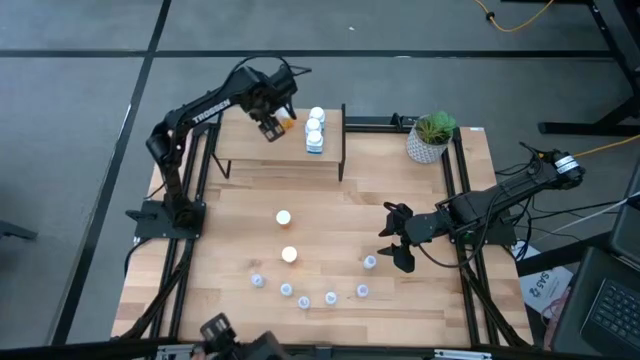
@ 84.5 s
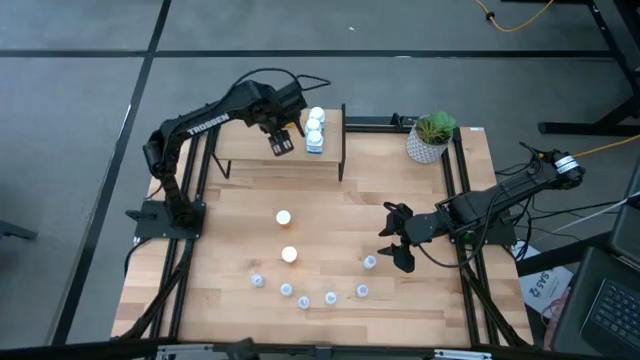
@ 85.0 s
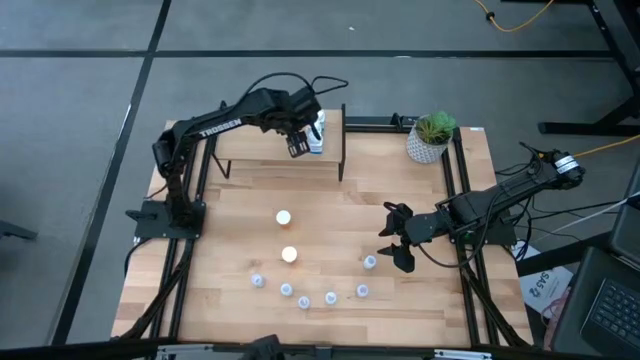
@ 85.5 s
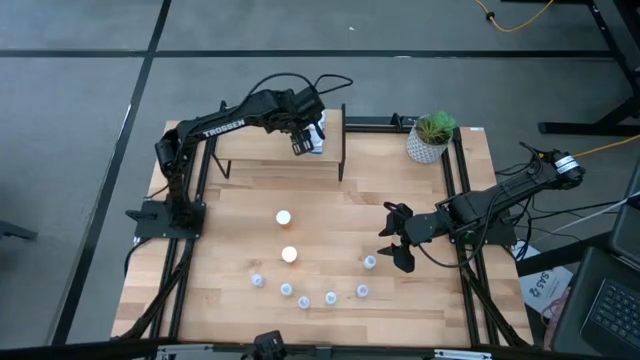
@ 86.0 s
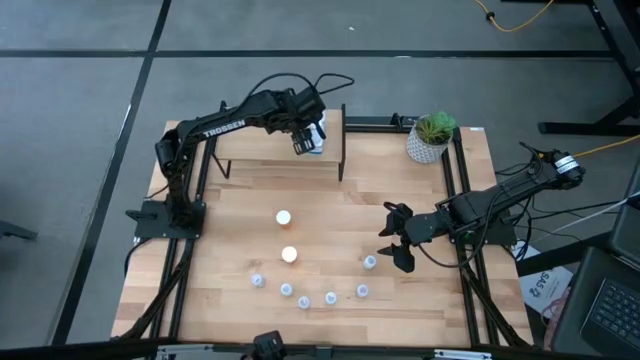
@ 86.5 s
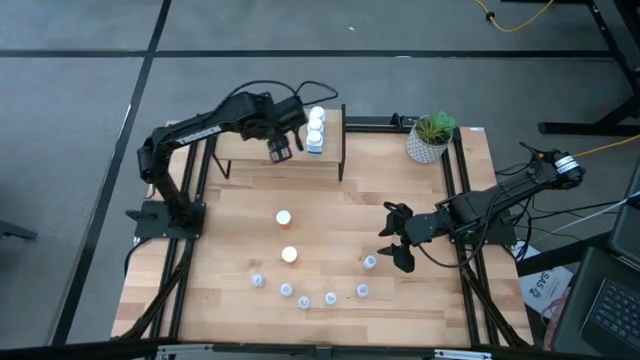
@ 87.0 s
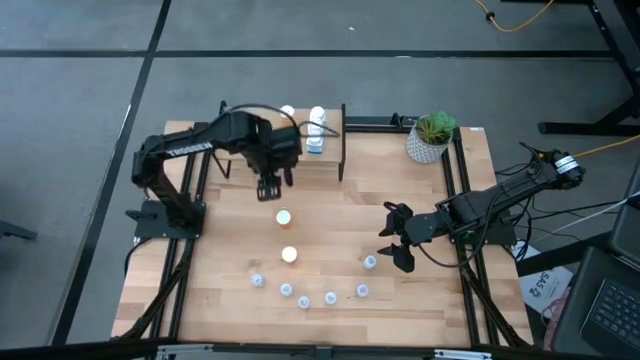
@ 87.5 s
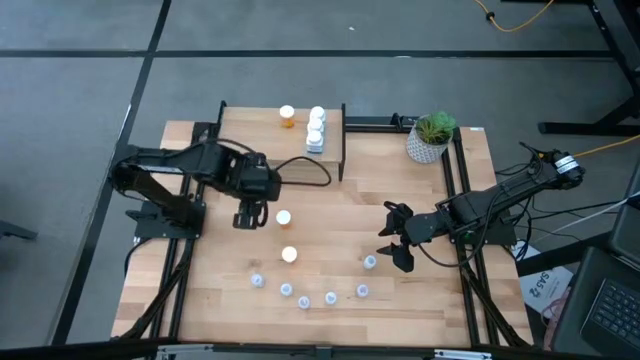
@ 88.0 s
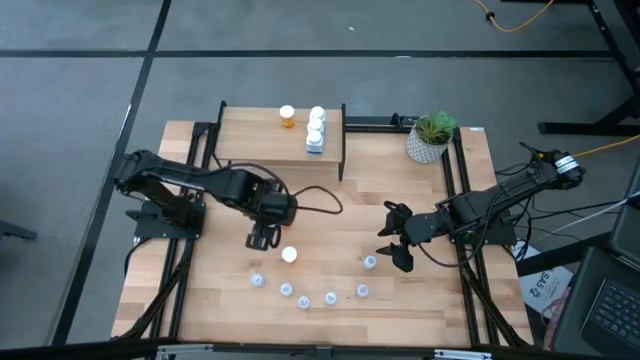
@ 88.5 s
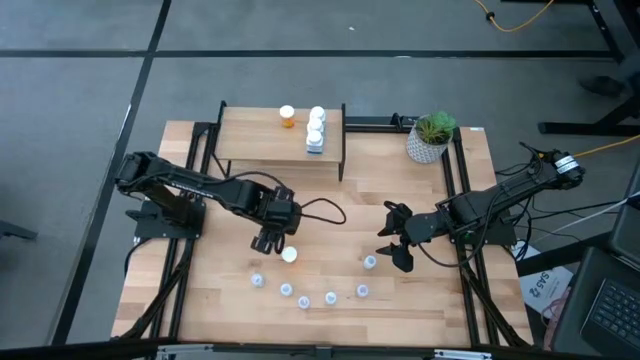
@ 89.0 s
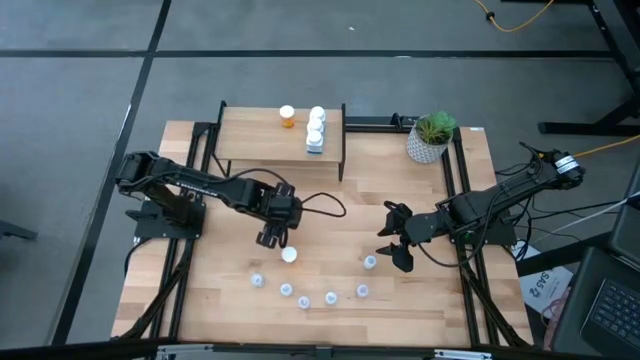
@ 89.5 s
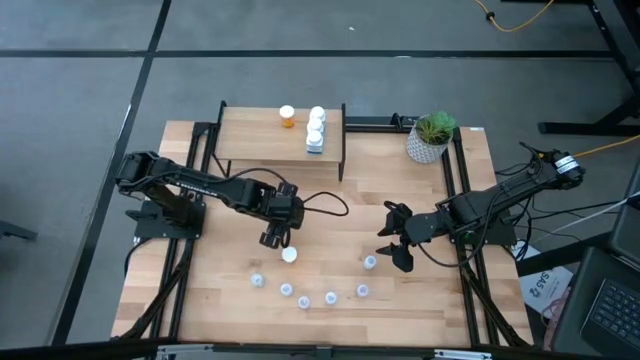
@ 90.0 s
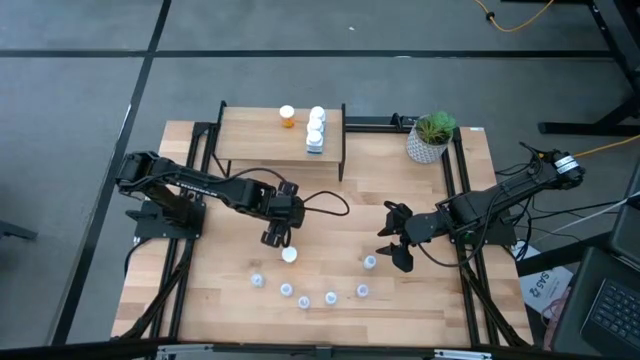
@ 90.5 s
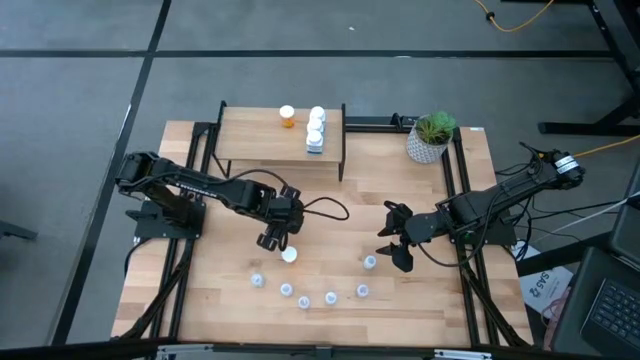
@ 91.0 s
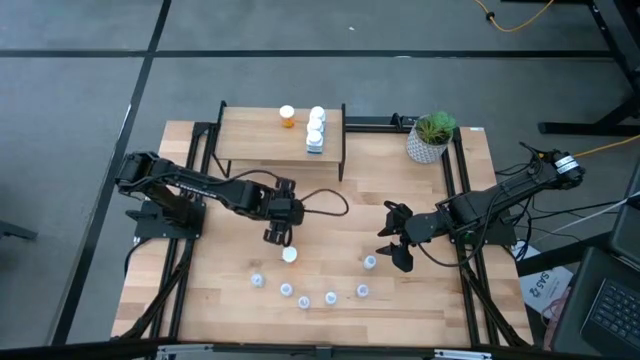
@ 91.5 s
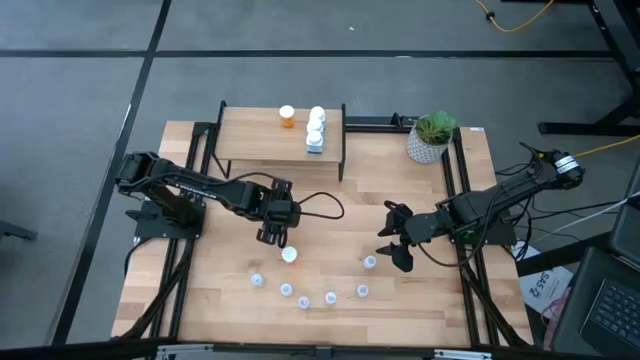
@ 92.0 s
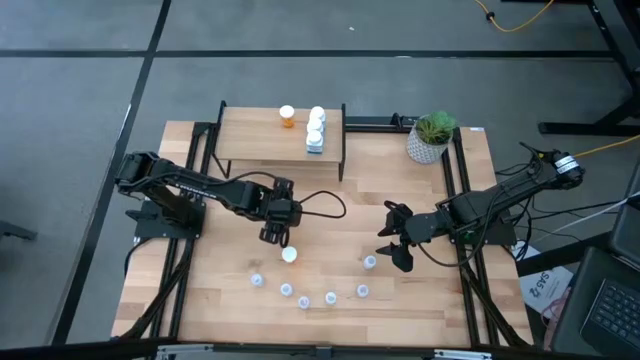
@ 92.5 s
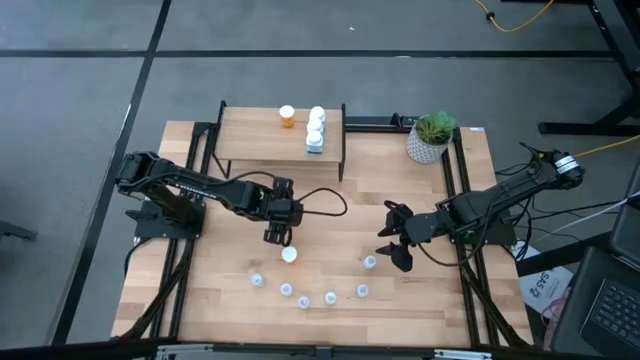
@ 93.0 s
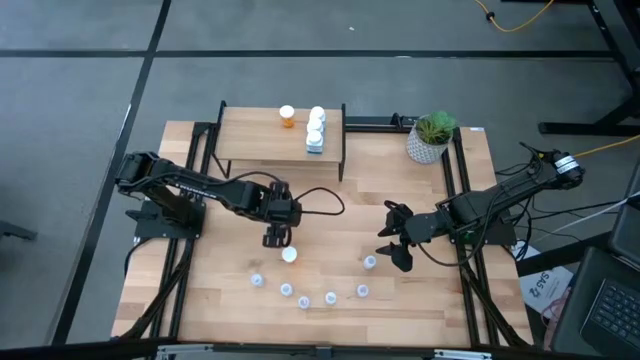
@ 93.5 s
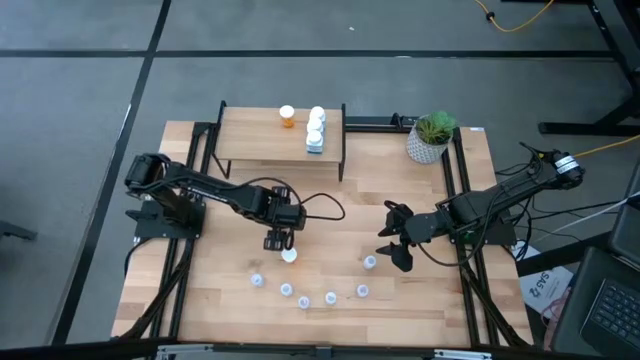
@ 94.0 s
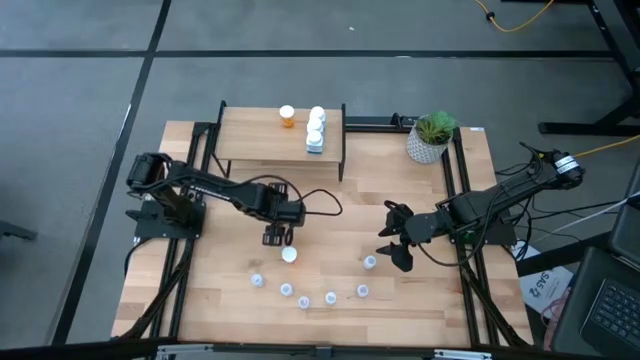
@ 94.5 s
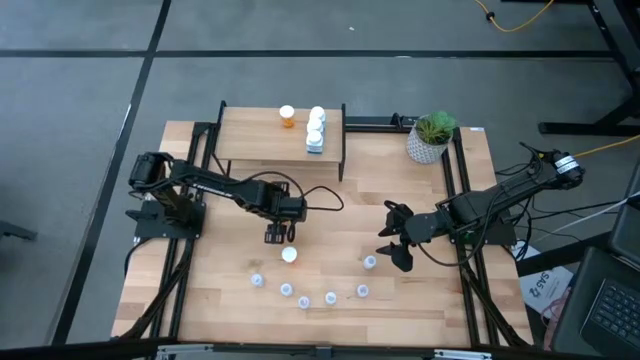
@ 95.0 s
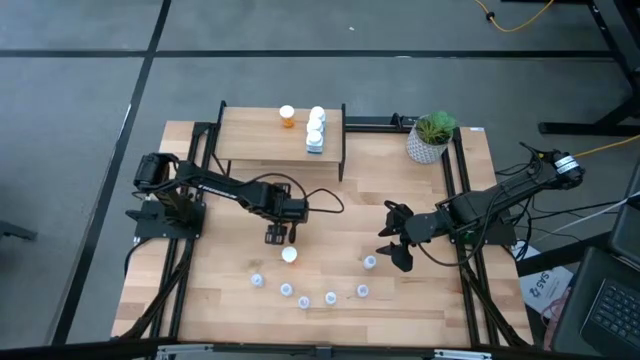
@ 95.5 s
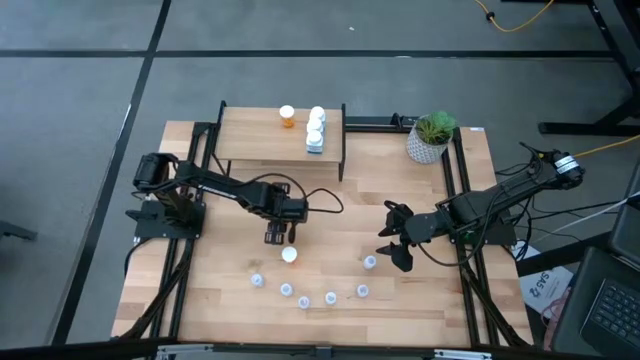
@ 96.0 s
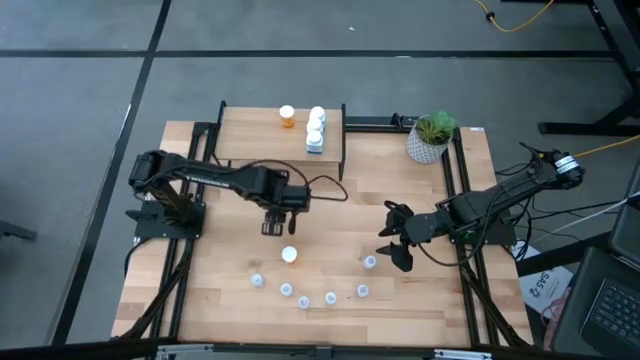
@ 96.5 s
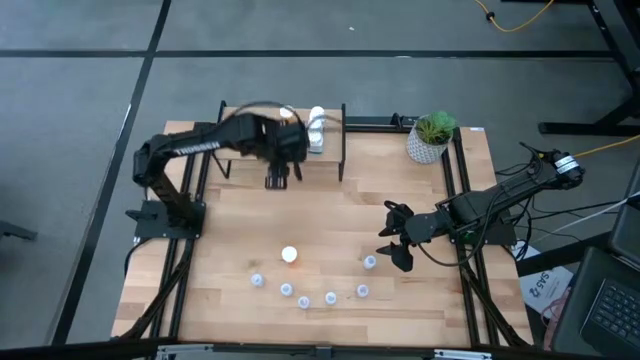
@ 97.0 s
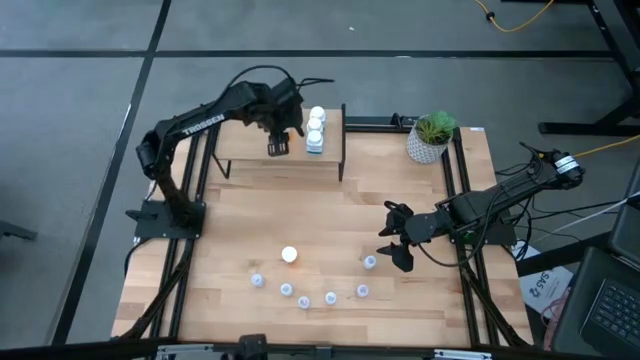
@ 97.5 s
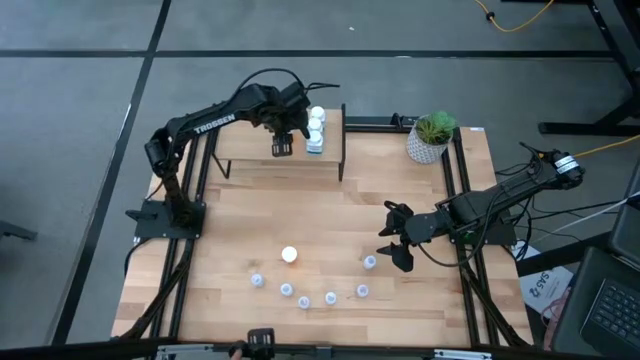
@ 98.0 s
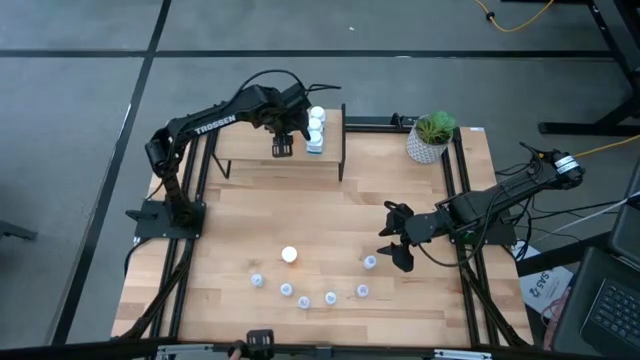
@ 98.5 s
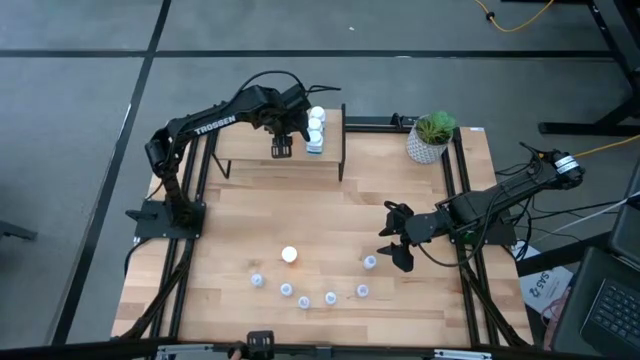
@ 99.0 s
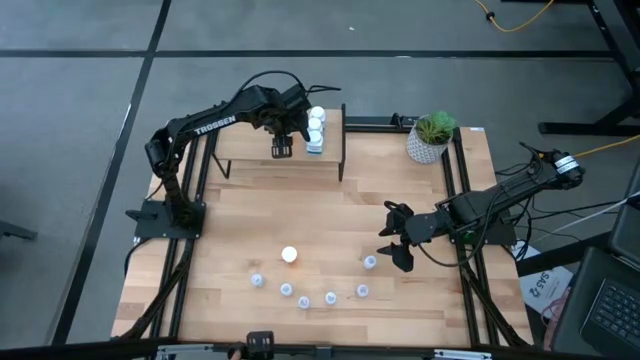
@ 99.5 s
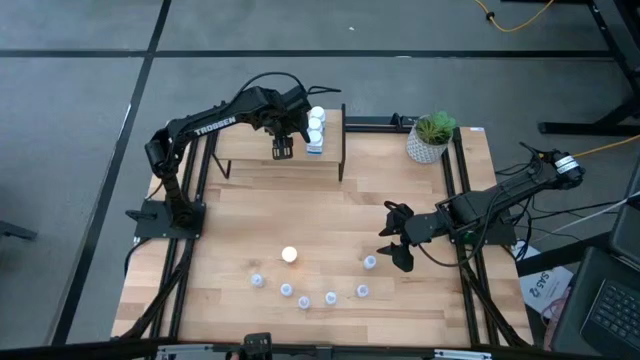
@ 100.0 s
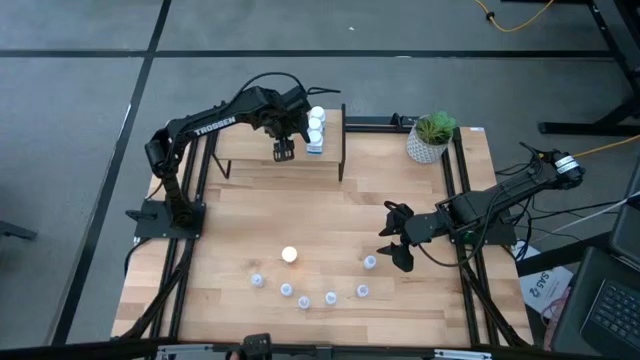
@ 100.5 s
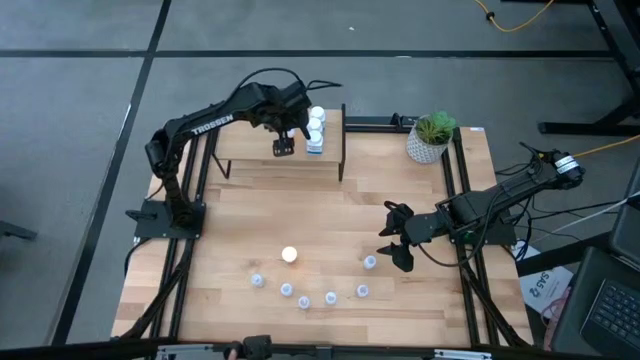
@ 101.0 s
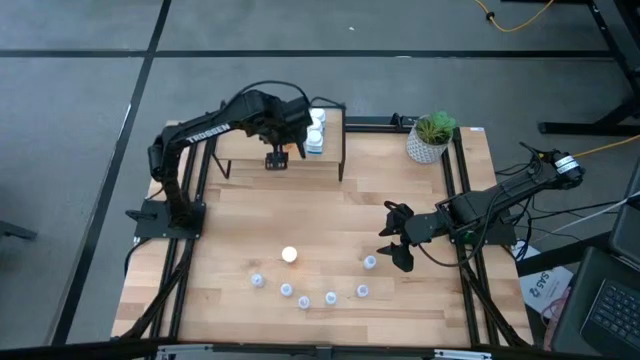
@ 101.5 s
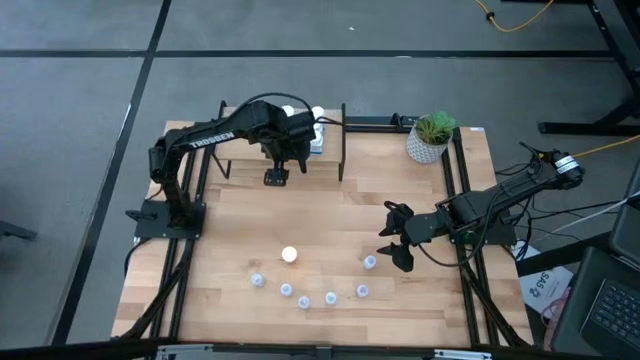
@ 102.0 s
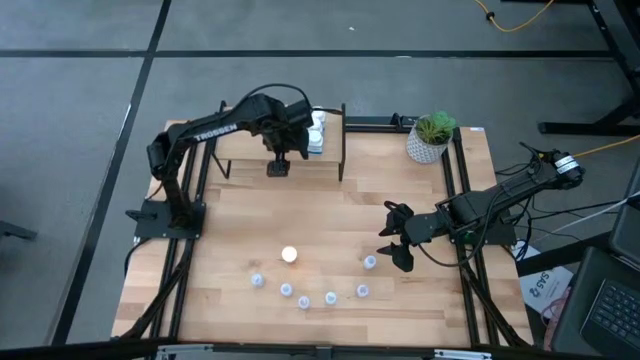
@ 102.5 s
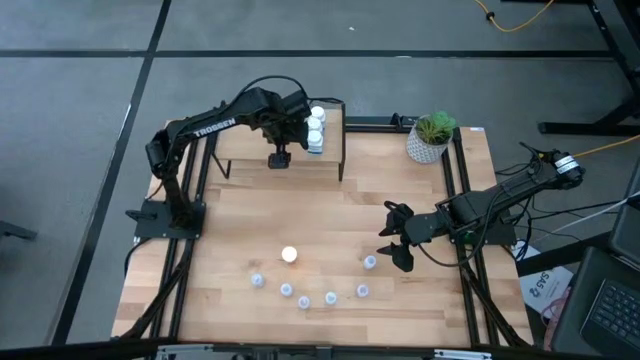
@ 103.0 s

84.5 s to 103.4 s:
Task: Pick and place medicine bottles onto shelf by color
Put the top orange pill bottle on the shelf aligned with the orange pill bottle

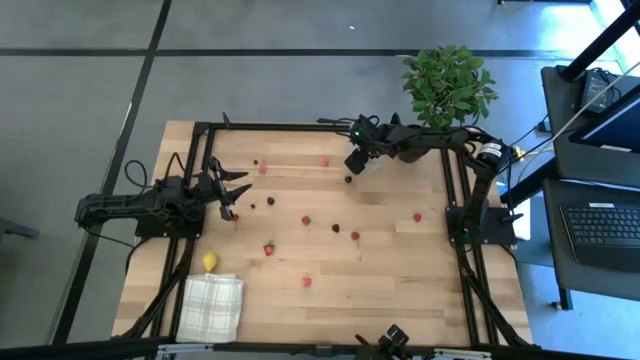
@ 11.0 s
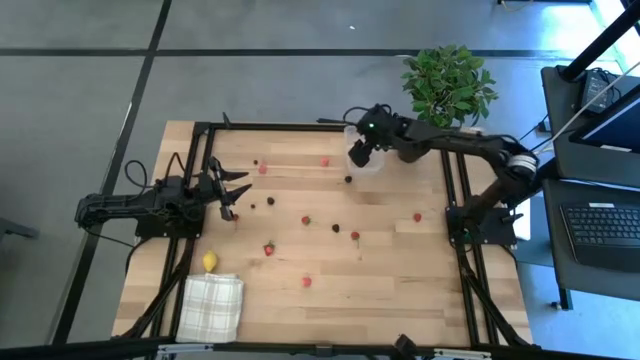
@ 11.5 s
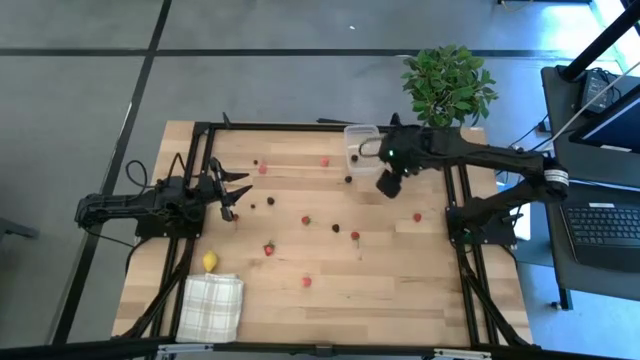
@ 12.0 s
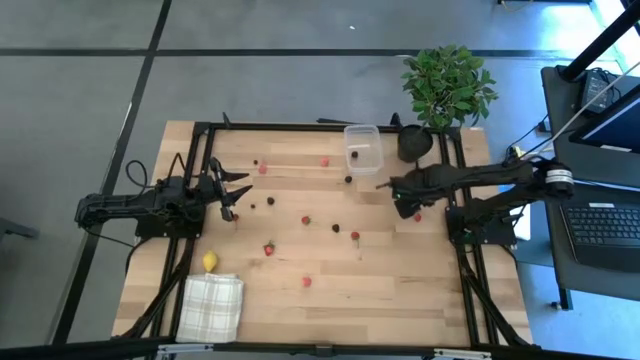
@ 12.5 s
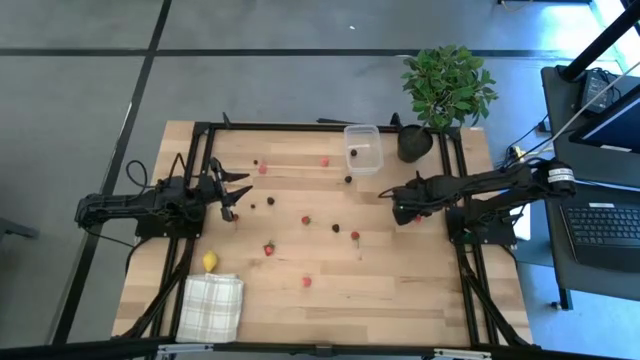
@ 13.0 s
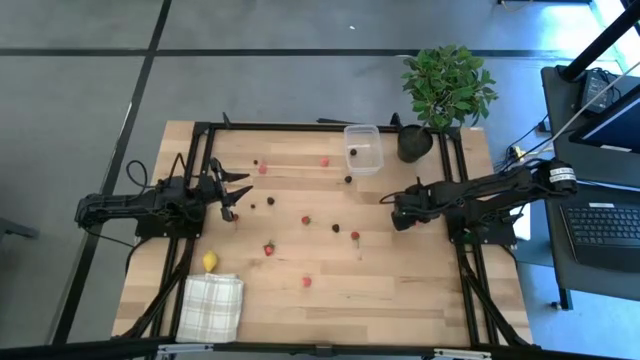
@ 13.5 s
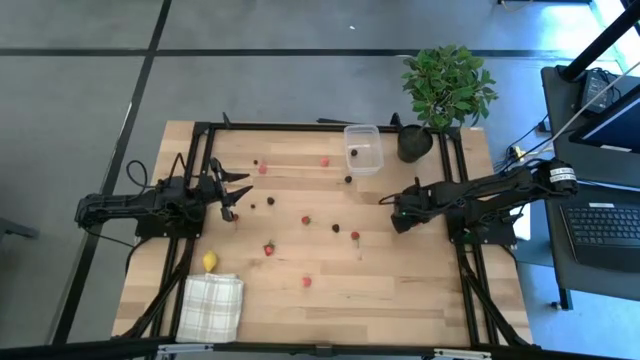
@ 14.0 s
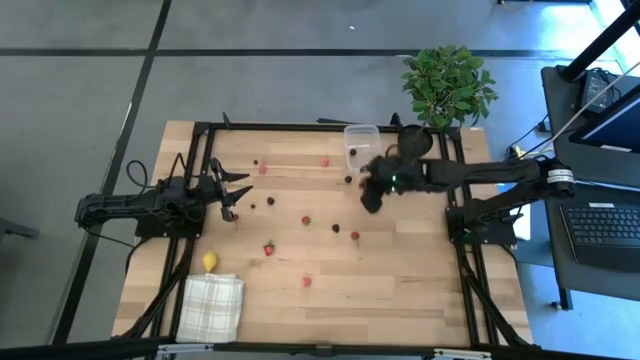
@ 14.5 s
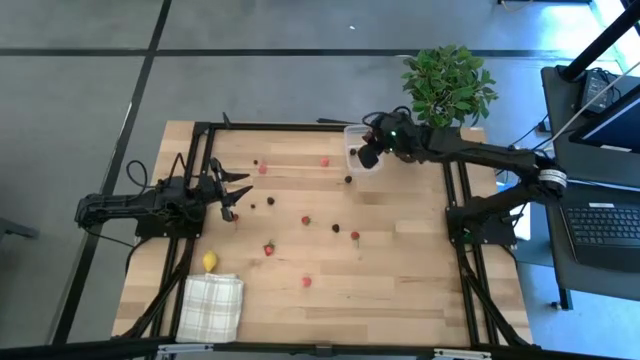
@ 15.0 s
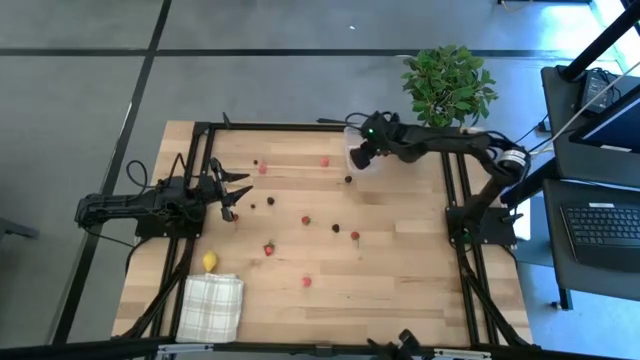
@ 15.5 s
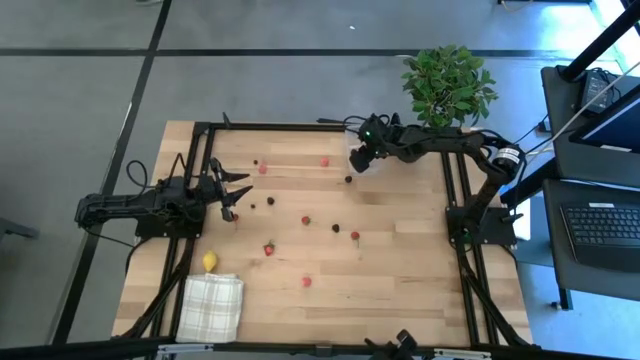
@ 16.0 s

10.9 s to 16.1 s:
Task: Pick and placing Produce into tupperware
Put the raspberry into the transparent bin
